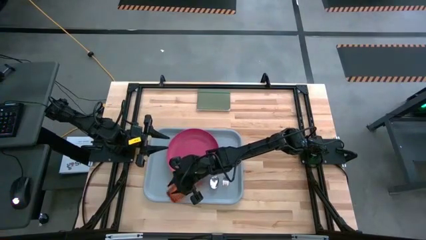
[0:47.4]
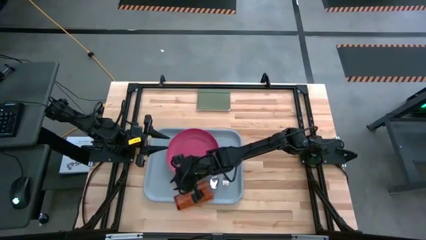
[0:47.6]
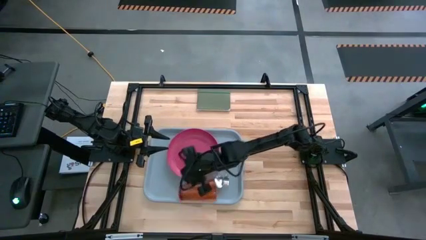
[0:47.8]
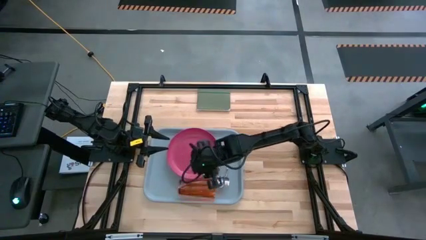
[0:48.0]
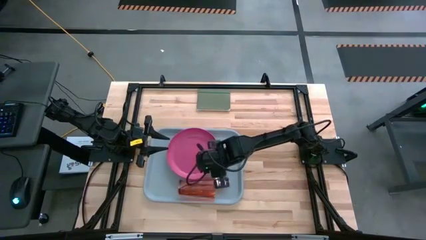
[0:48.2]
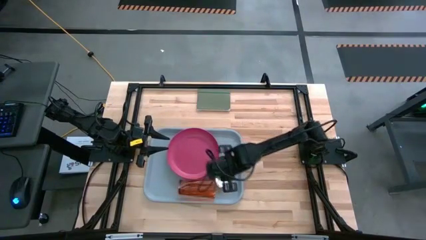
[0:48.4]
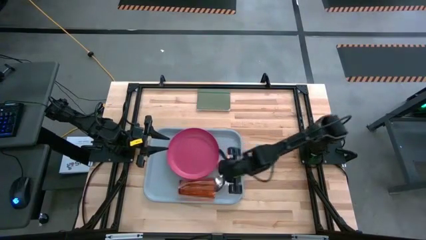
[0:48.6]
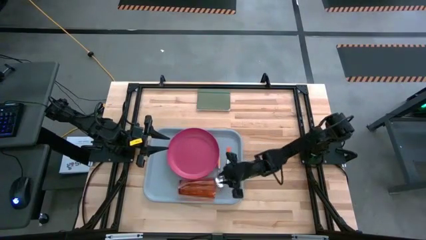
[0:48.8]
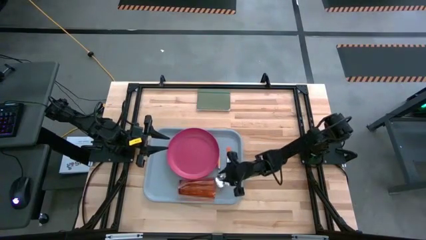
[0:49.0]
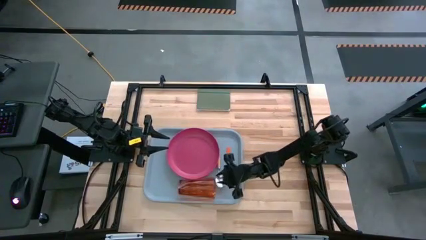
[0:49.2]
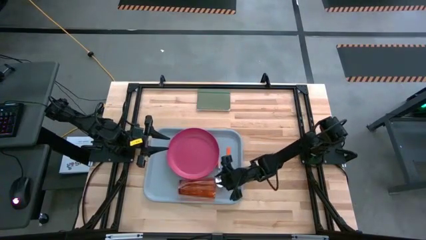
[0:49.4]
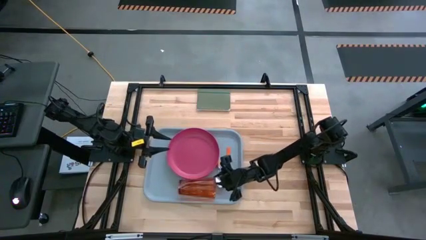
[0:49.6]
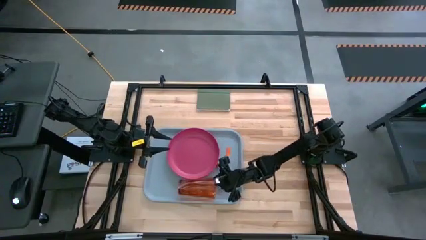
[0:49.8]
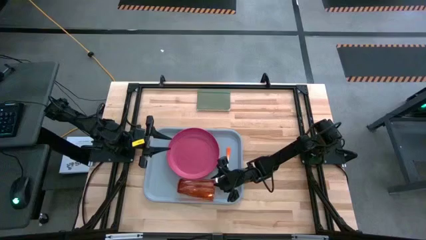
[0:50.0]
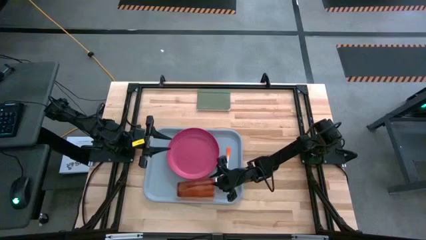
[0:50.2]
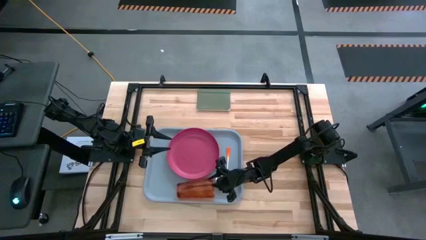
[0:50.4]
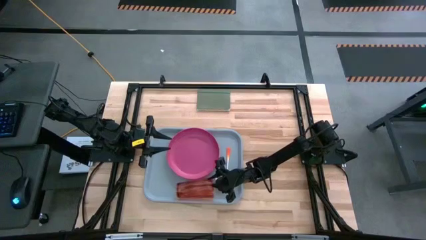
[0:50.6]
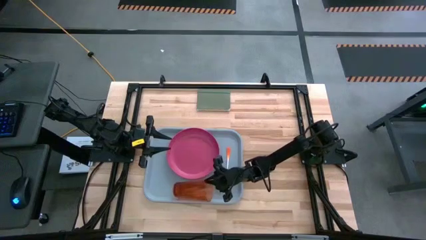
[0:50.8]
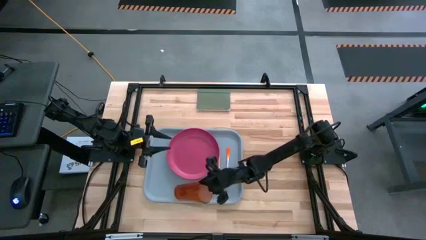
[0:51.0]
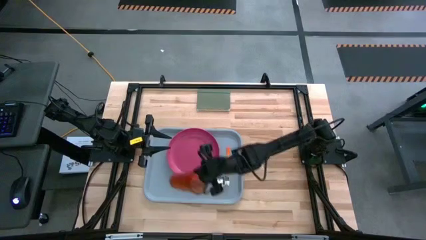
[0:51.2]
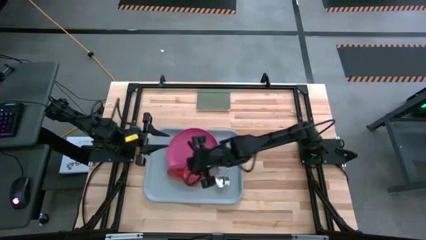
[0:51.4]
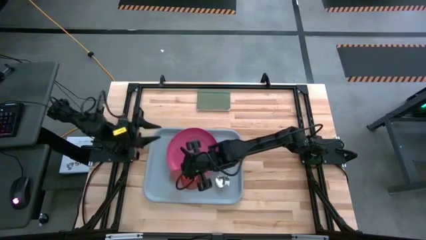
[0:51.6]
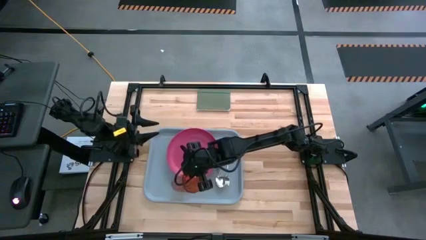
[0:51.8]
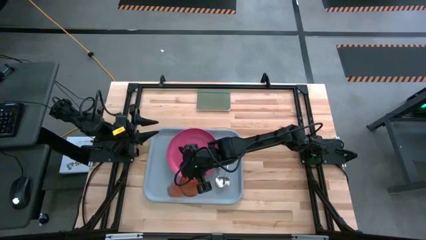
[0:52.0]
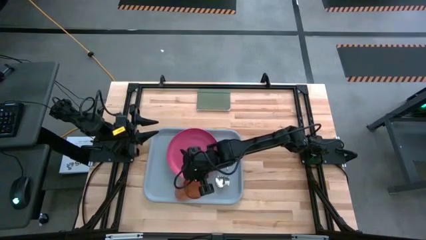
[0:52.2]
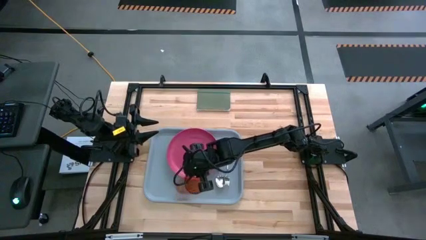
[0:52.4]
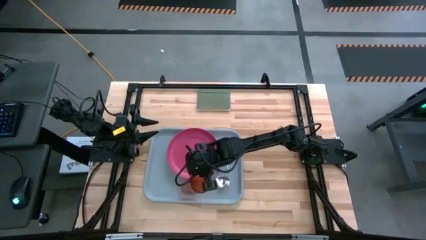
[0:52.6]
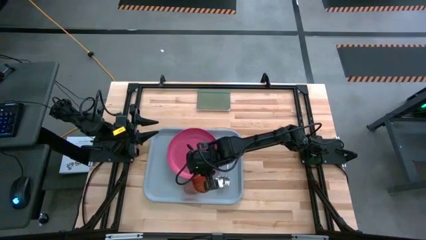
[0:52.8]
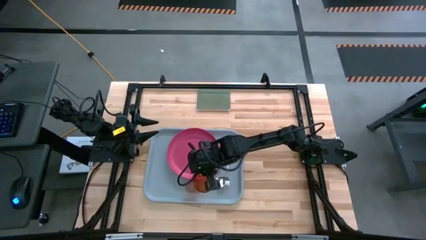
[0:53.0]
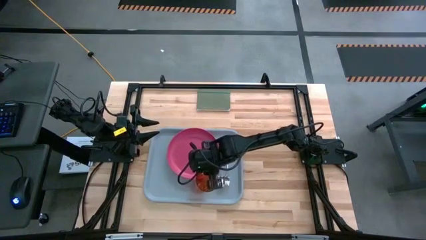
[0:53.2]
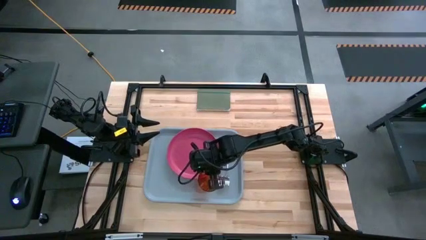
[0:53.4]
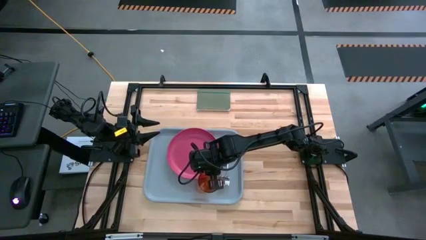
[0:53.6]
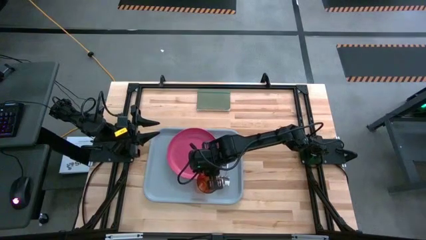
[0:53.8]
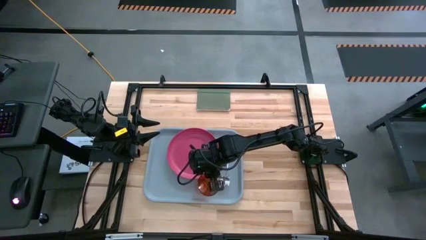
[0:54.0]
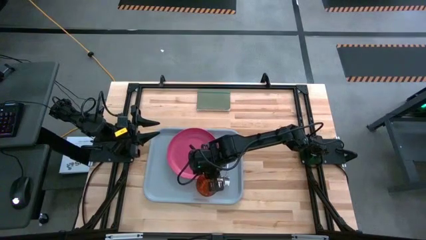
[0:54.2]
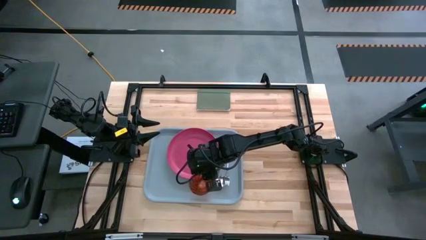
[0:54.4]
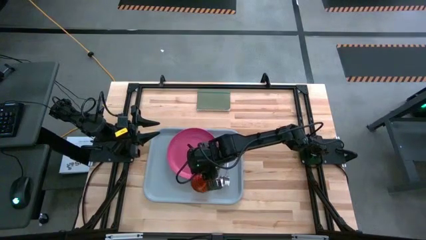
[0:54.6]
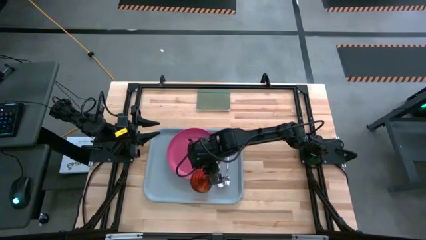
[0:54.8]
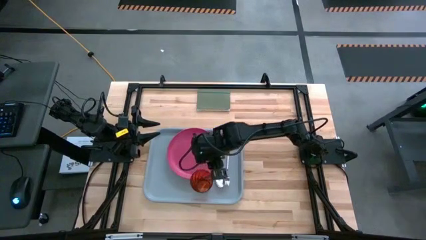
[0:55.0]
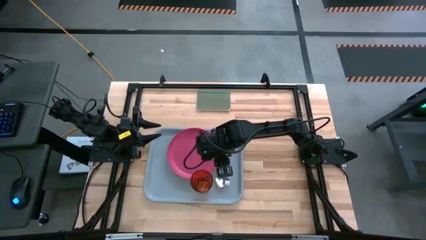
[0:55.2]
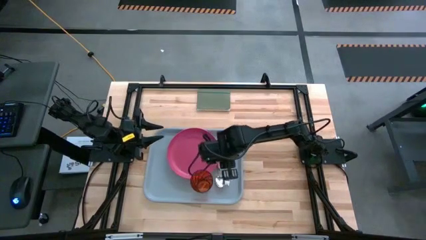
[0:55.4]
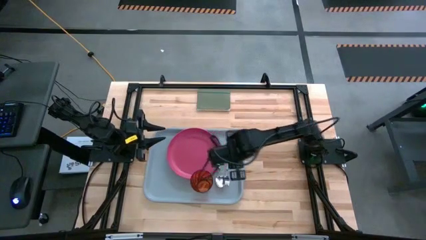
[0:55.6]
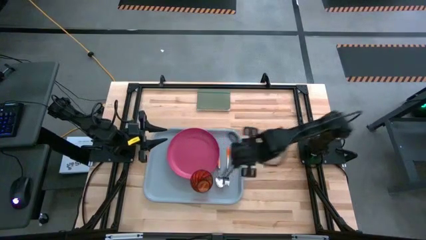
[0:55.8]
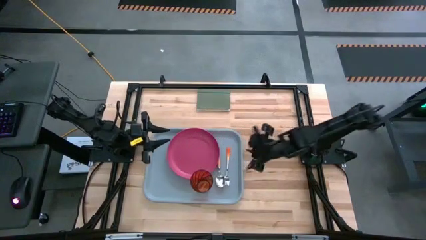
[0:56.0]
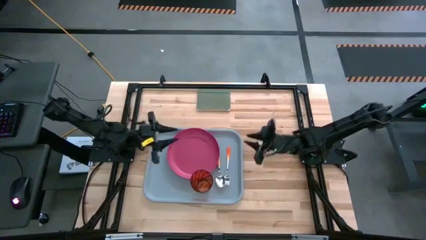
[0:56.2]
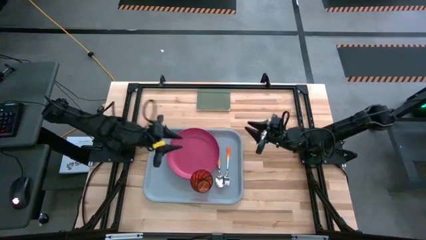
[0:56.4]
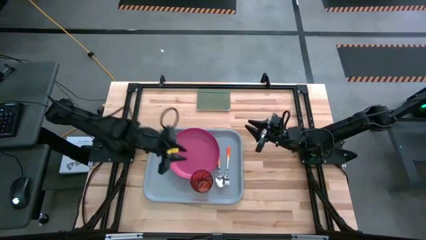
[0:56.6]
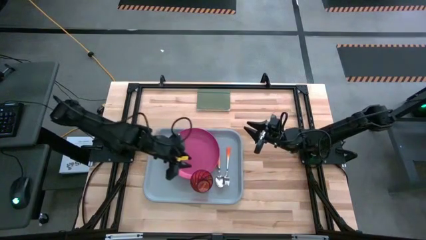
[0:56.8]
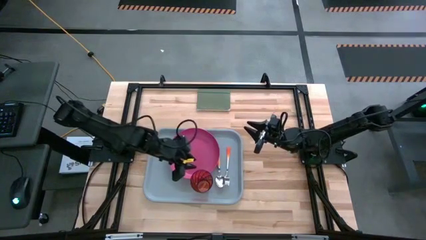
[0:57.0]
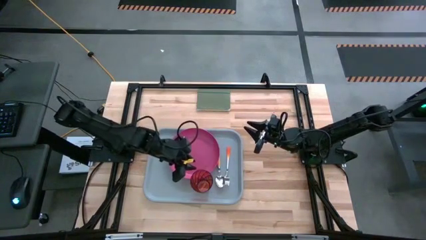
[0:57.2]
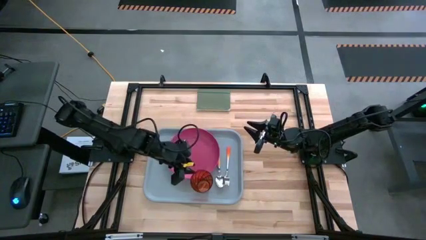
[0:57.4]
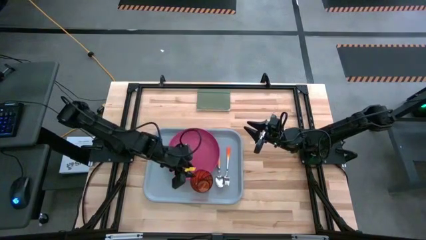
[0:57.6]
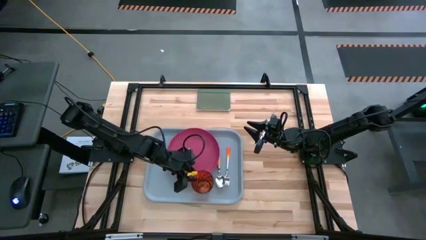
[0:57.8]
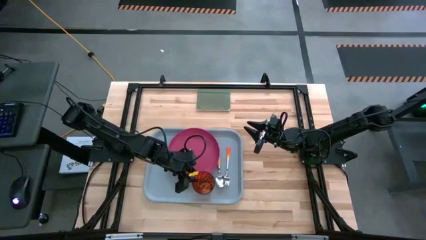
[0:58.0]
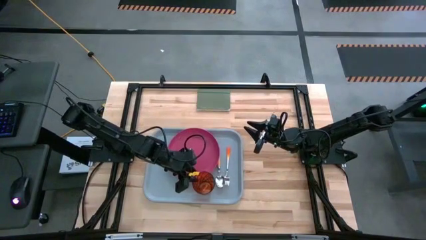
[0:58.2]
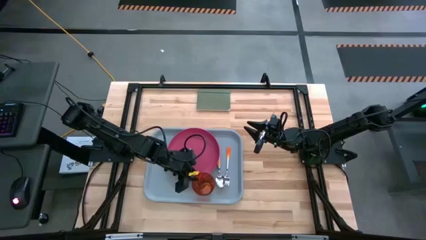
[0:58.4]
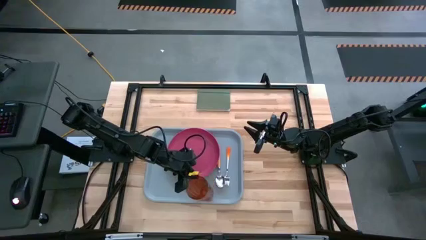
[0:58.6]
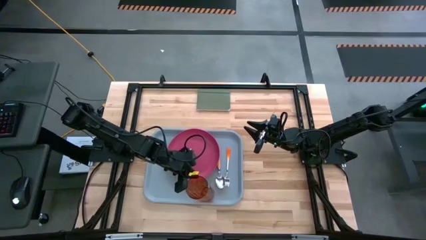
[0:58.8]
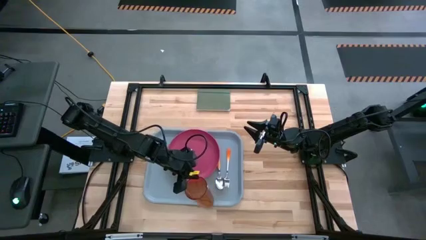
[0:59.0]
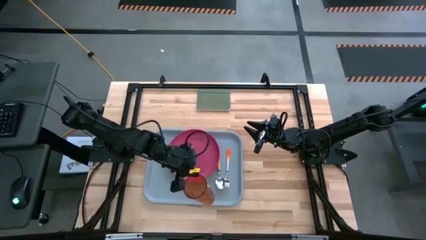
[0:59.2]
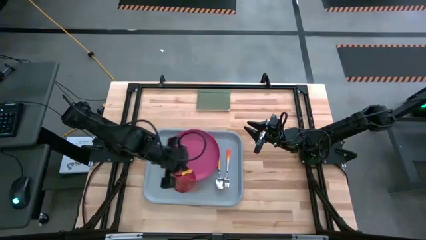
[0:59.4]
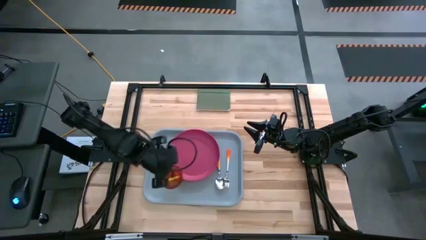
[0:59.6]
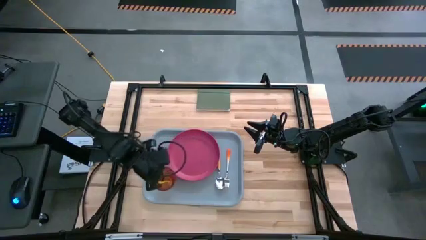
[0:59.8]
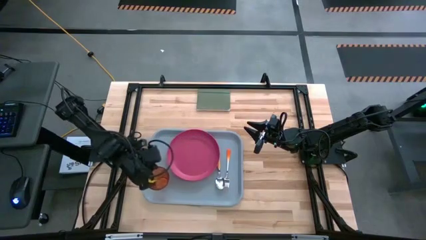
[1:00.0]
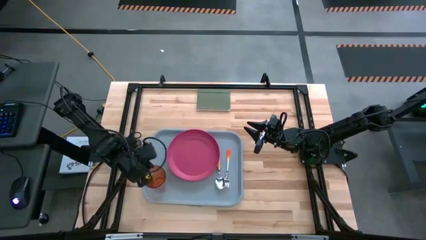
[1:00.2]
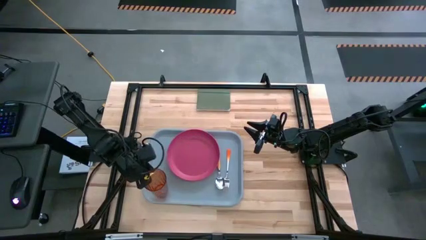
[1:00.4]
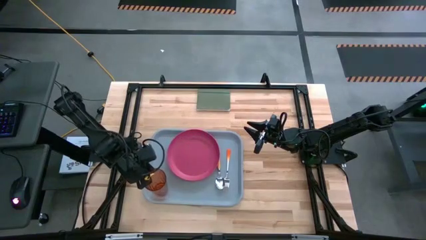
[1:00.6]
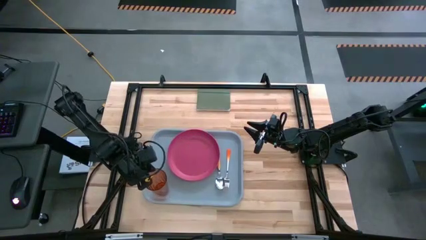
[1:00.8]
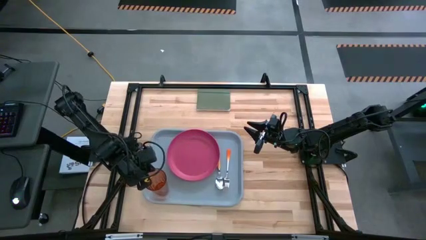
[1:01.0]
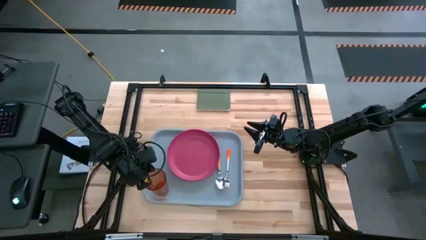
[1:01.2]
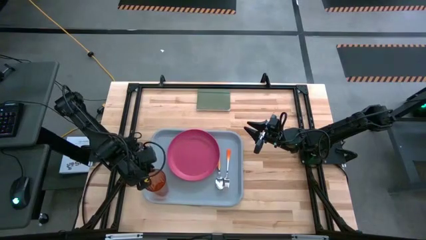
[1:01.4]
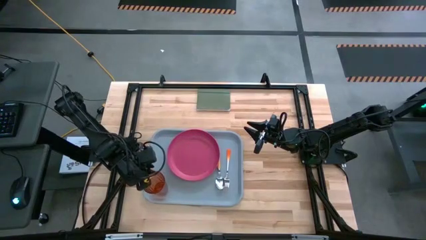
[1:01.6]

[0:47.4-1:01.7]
Task: Pick and place plate/cup/fork/spoon on tray
Put the orange cup on the gray tray to the top right of the pink plate
